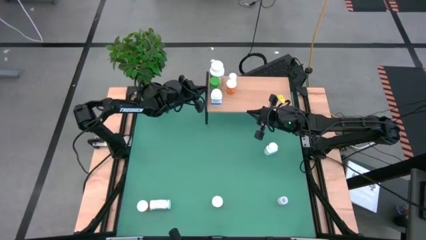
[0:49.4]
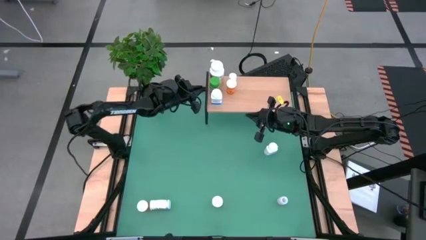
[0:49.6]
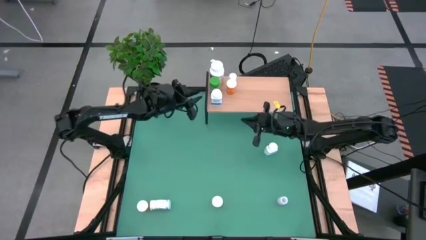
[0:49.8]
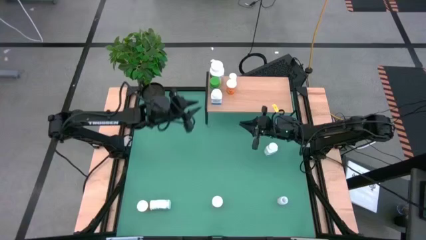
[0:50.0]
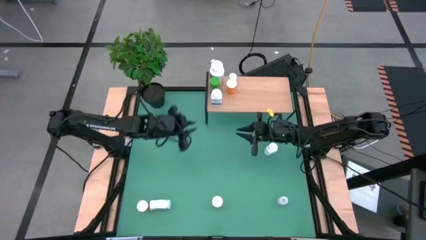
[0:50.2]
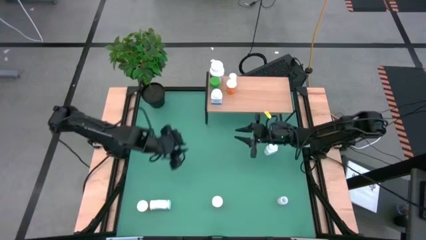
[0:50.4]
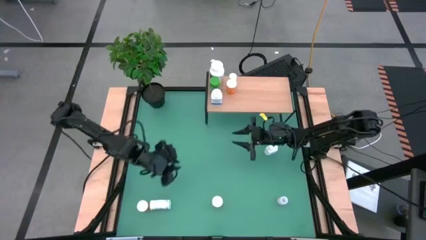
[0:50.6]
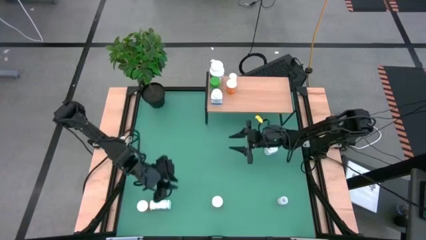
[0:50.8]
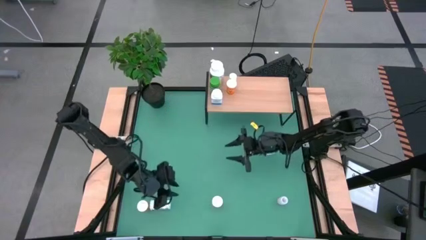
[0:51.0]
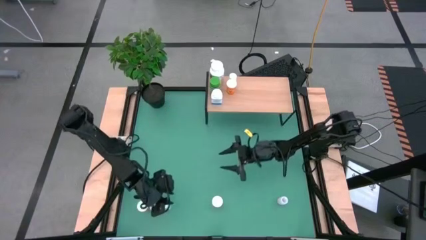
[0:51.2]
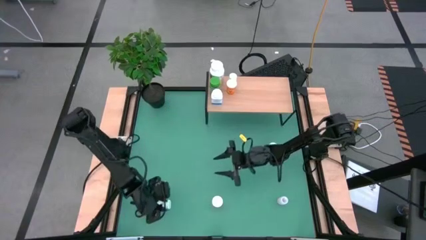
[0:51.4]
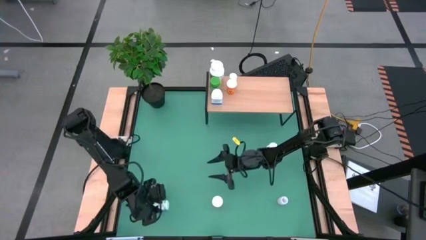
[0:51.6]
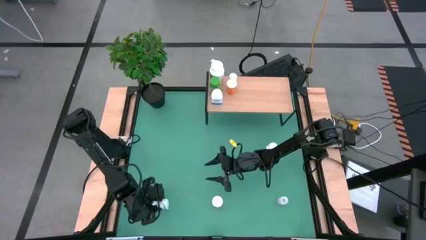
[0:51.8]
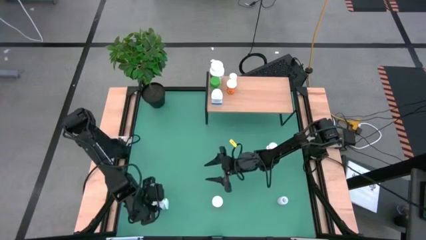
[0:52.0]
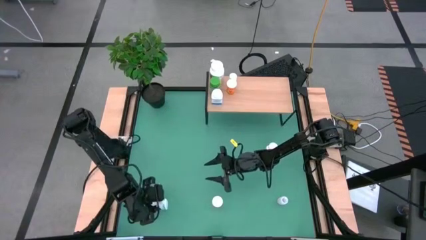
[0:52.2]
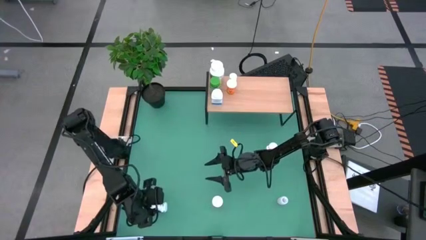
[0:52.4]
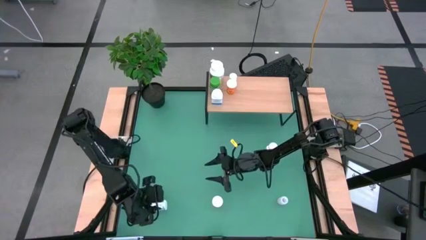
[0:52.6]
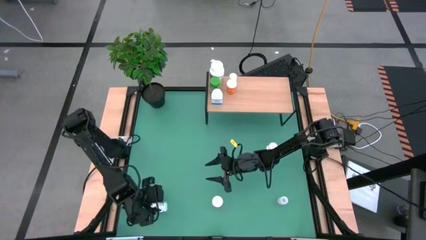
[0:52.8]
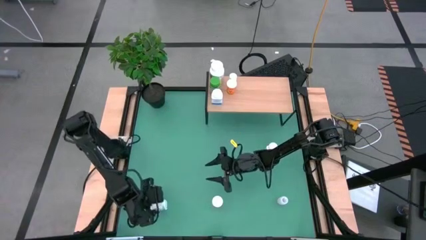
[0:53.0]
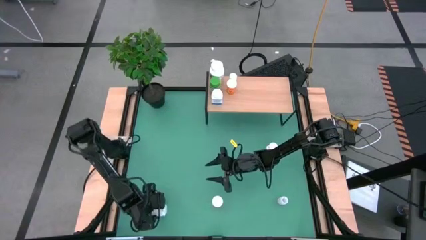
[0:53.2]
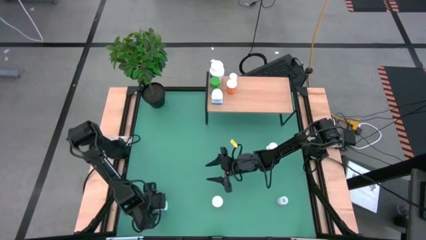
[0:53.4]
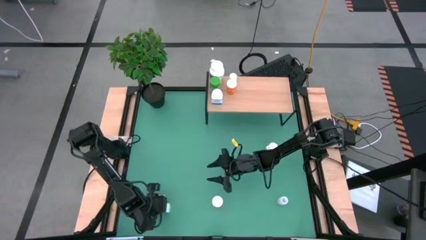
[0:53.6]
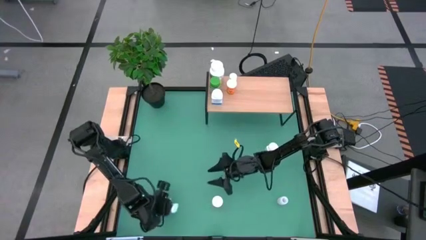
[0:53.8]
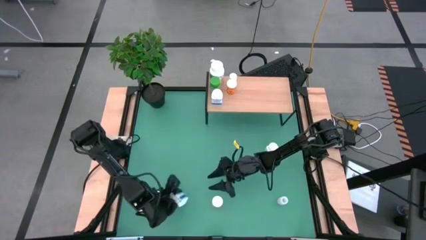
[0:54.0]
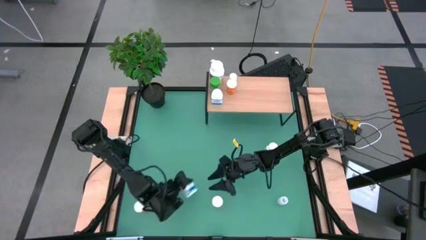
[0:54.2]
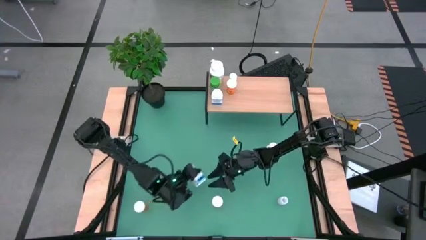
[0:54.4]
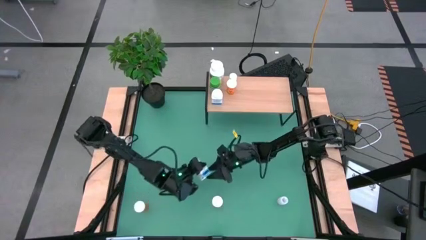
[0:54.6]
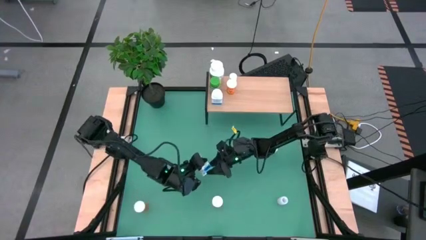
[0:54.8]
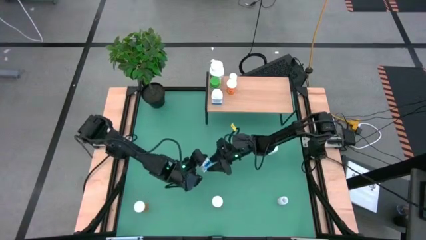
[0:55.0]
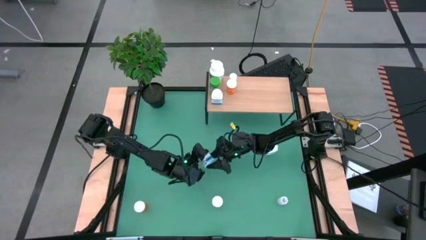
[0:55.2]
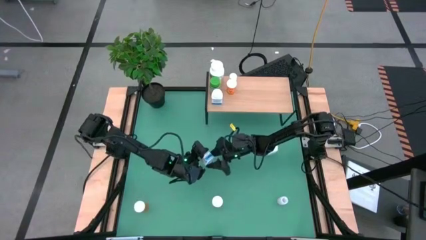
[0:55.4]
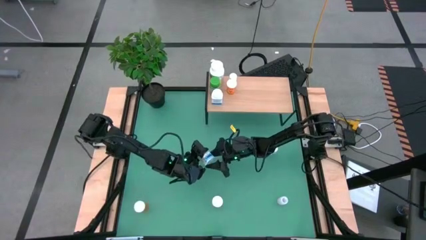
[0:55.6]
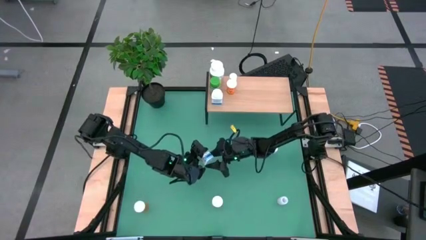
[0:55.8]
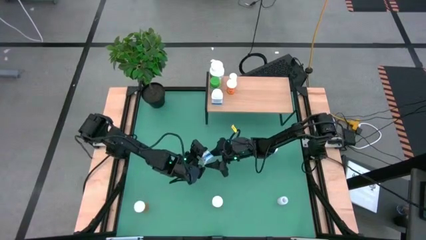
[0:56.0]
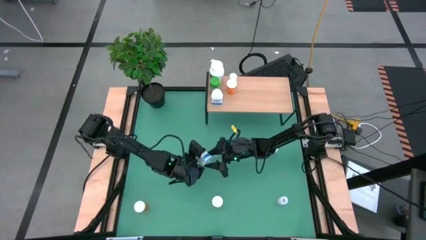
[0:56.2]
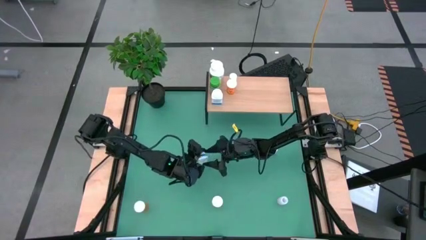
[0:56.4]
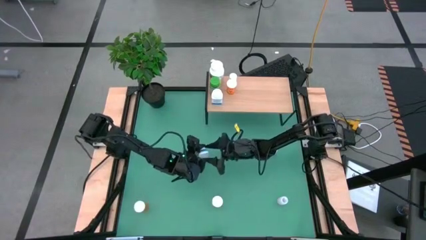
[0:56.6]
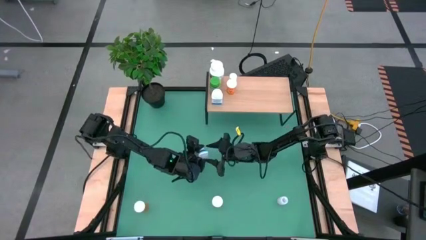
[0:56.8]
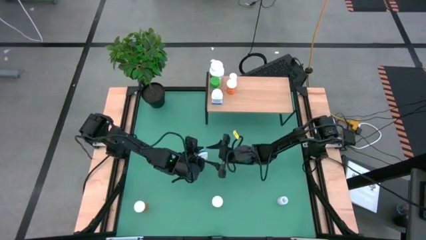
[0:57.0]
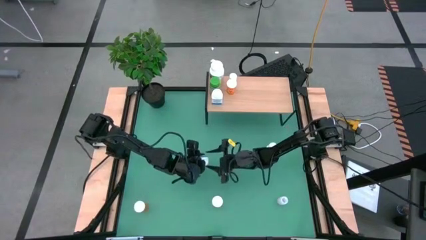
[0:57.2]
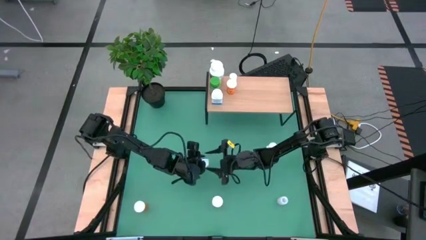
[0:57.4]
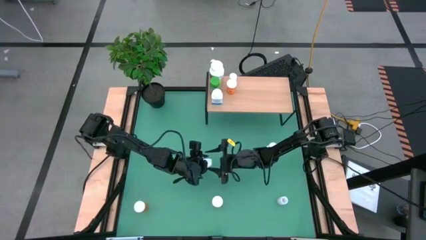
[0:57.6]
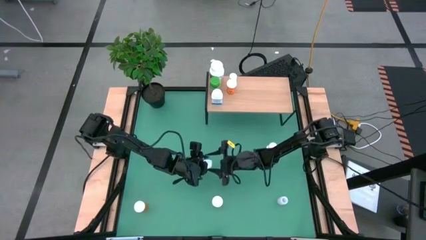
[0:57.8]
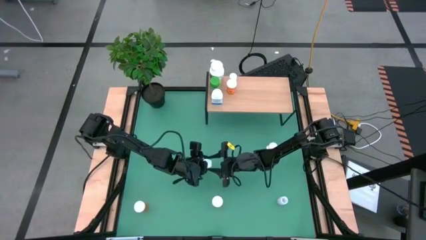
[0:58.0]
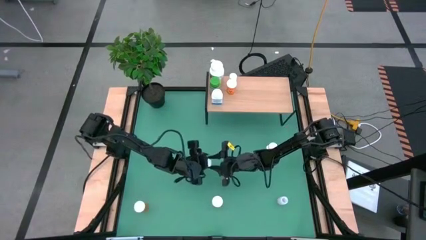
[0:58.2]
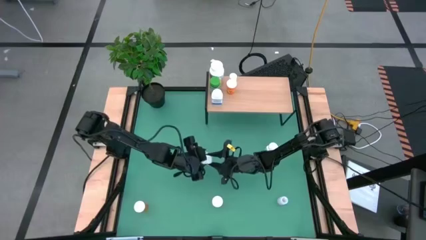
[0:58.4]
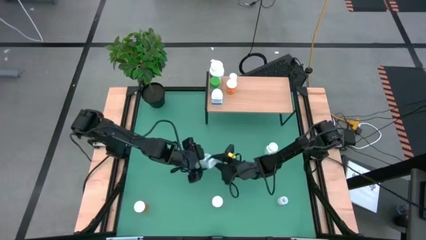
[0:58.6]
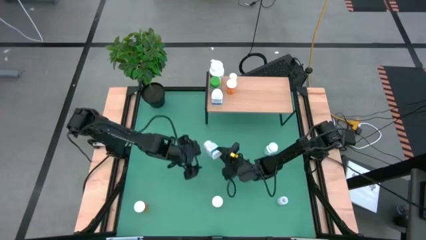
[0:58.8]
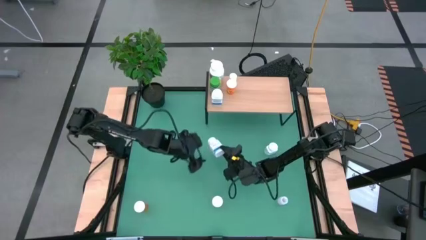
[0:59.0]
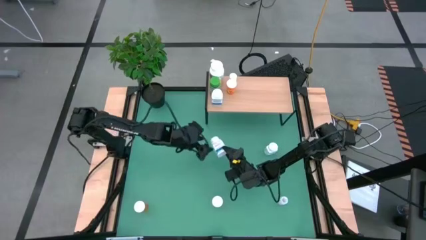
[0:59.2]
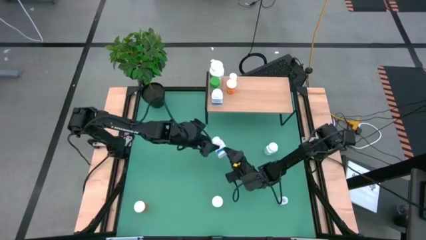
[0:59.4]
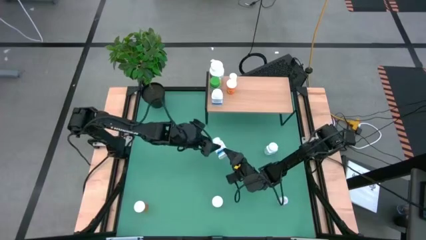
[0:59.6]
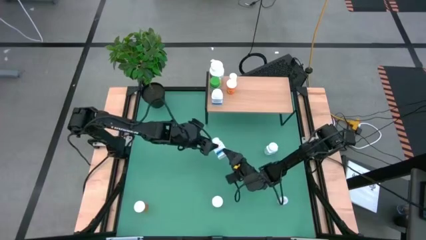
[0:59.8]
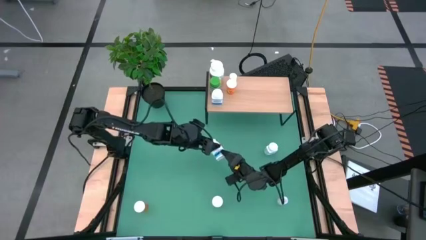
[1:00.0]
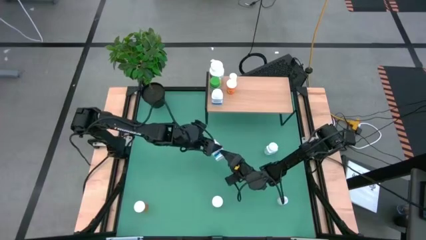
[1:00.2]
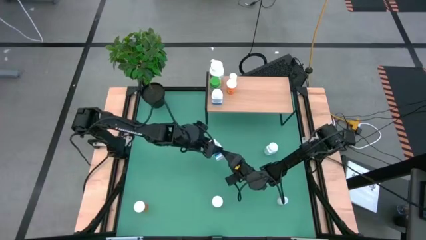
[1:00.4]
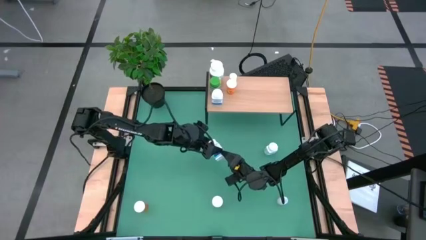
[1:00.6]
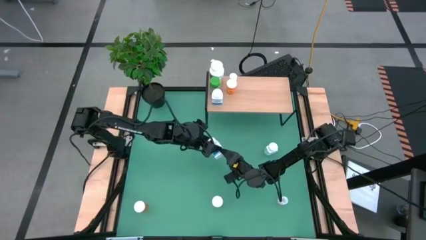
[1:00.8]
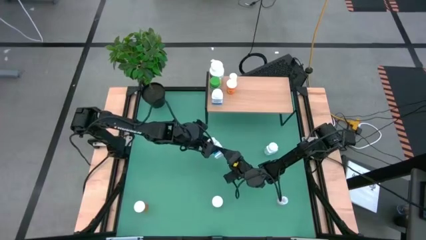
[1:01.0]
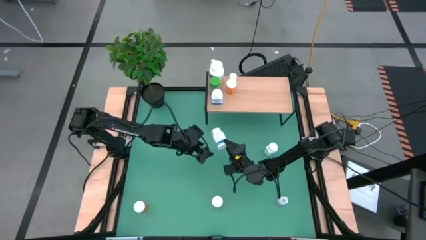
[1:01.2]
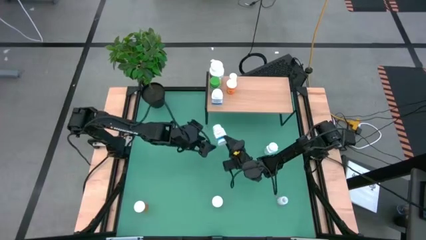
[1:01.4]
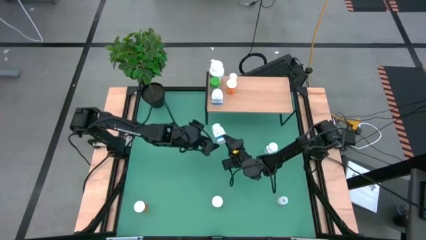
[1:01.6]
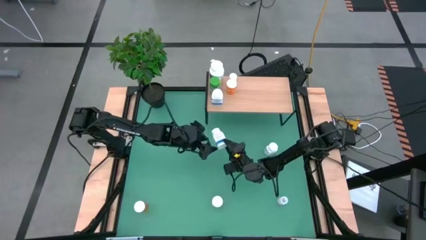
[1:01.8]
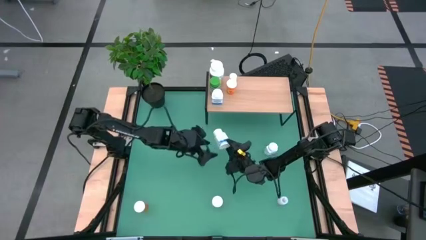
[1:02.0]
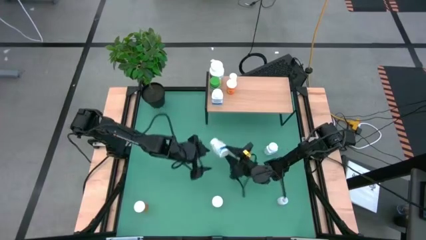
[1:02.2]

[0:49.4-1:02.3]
Task: Pick and place medicine bottles onto shelf by color
Put the bottom white blue medicine bottle on the shelf

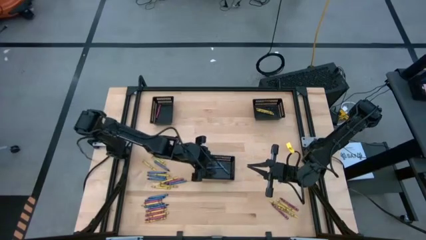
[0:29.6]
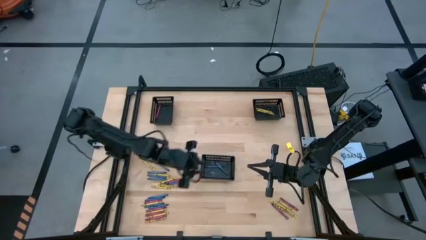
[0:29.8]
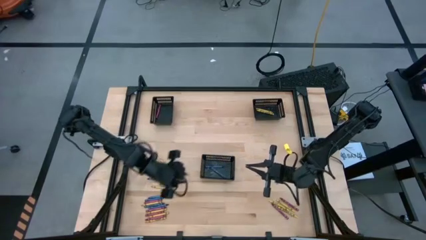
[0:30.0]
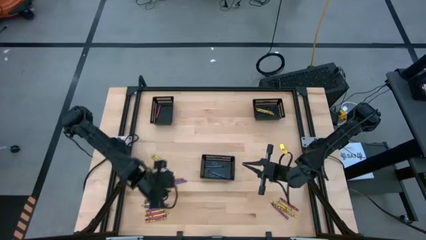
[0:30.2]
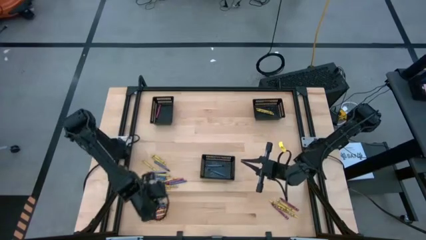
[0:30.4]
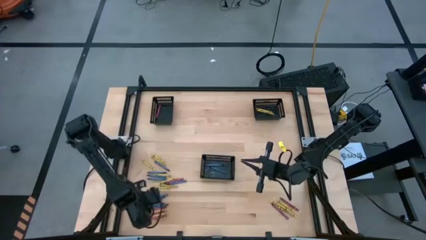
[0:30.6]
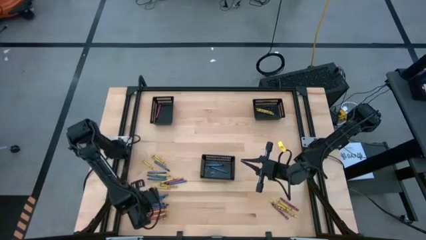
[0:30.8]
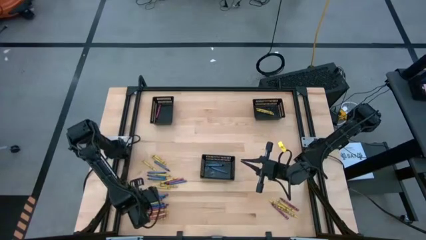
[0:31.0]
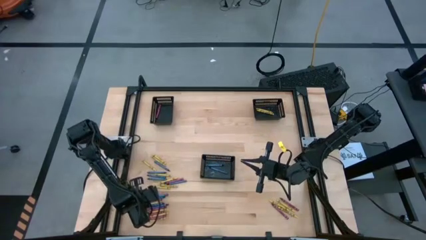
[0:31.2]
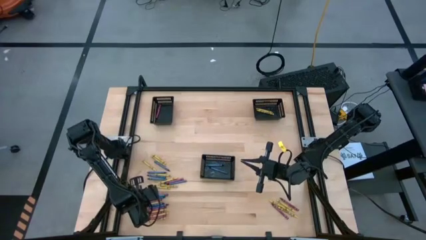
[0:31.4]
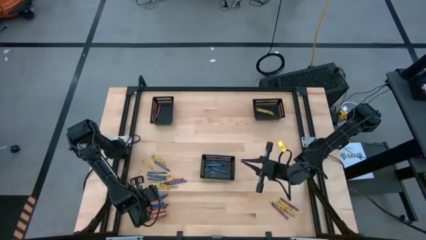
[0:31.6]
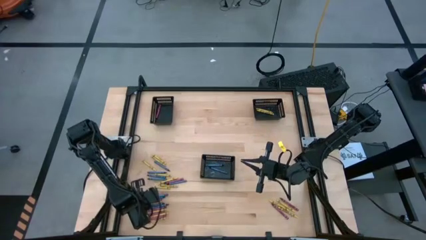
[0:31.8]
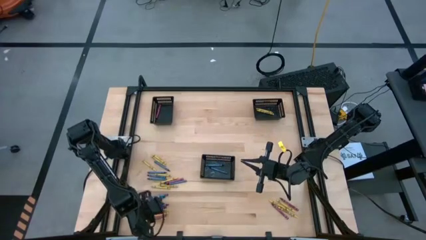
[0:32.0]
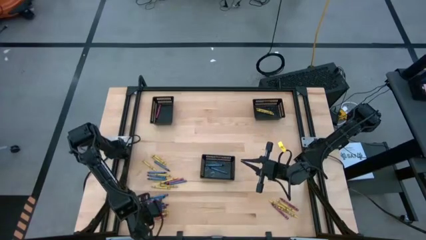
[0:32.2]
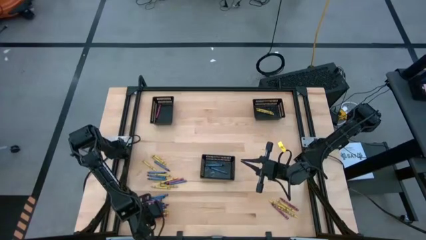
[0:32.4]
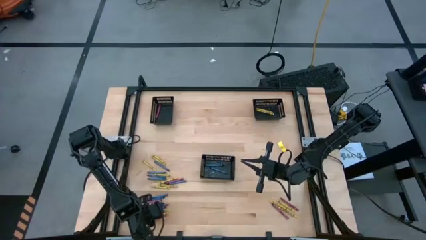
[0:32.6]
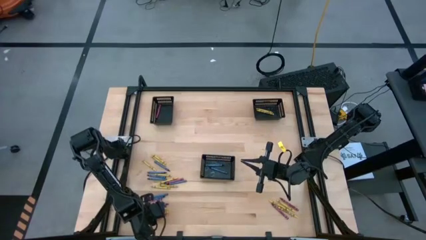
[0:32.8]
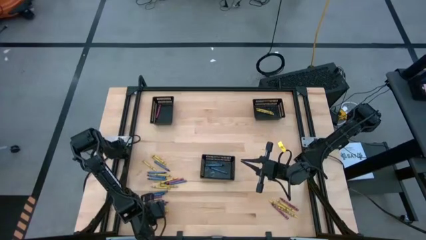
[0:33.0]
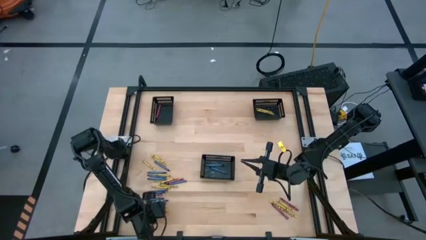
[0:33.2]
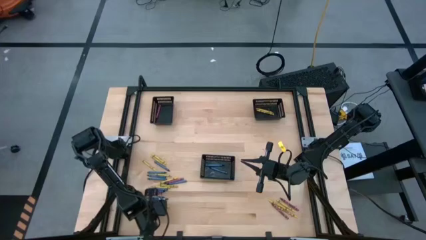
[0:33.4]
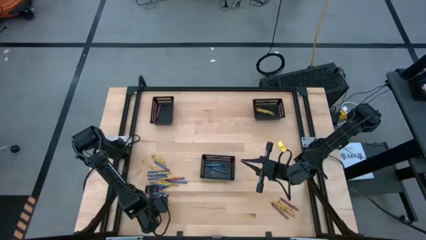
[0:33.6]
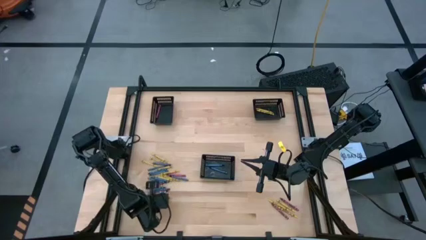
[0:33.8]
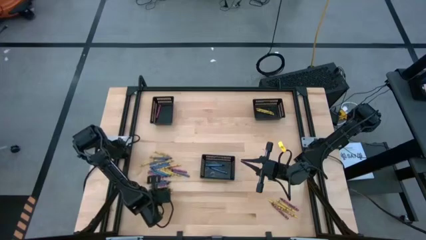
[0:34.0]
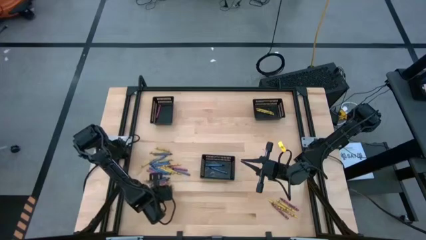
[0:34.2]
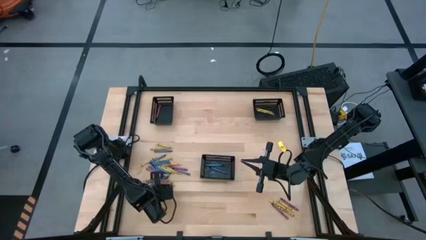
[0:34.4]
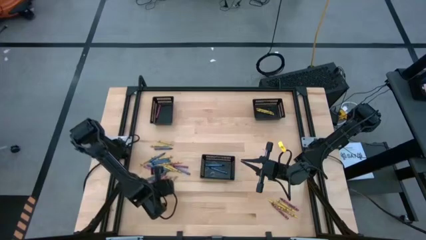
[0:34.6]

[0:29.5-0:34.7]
Task: Sort crayons
Move the crayons to the middle left of the table
